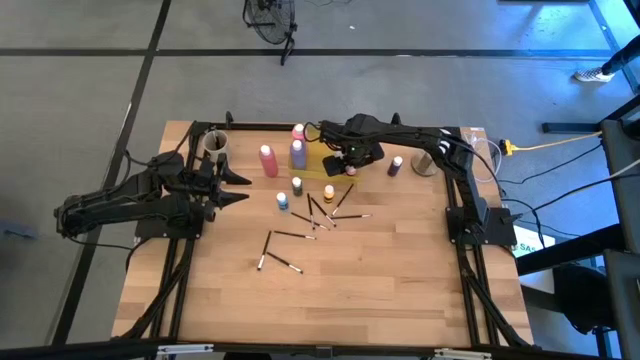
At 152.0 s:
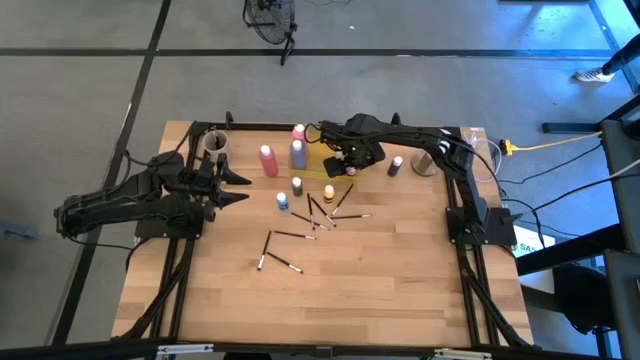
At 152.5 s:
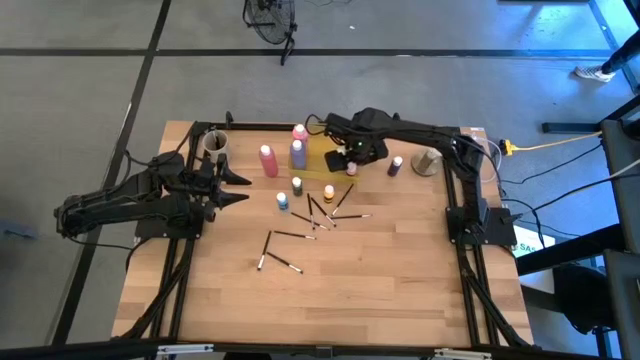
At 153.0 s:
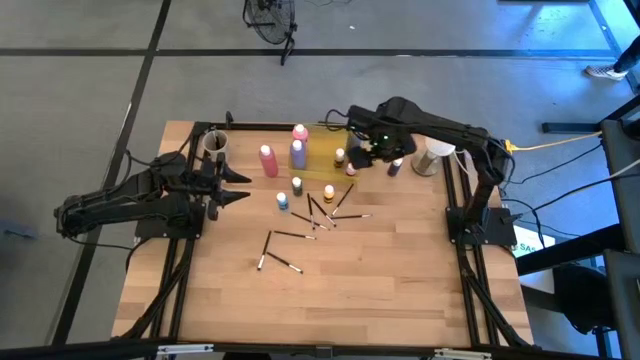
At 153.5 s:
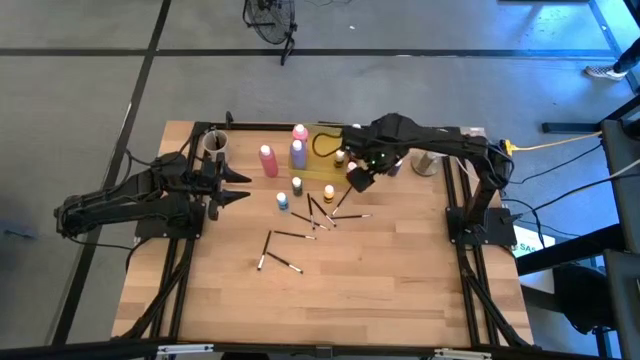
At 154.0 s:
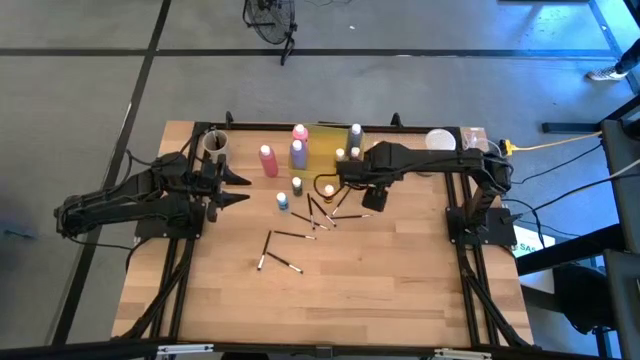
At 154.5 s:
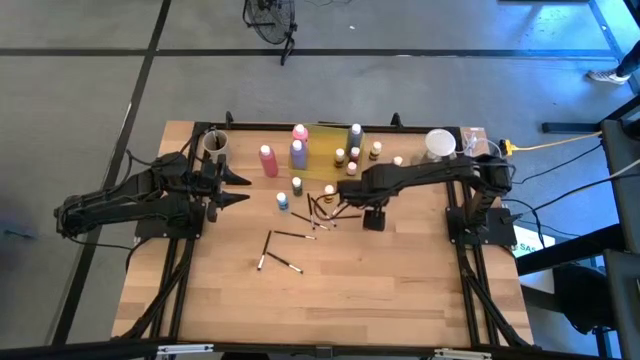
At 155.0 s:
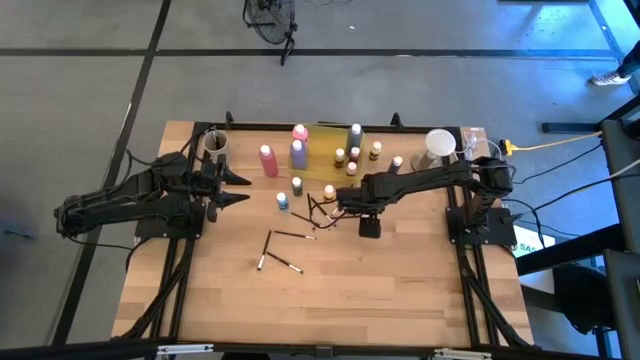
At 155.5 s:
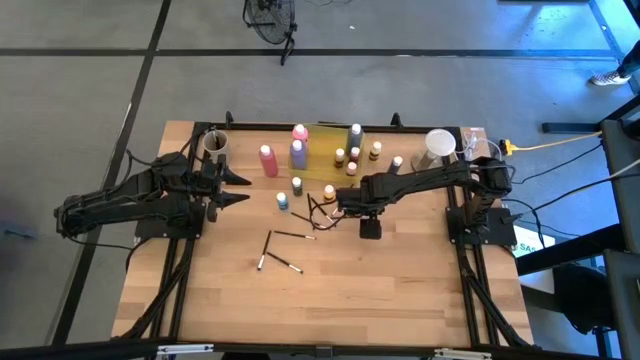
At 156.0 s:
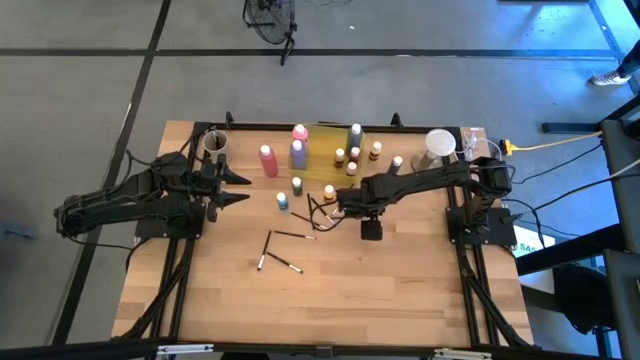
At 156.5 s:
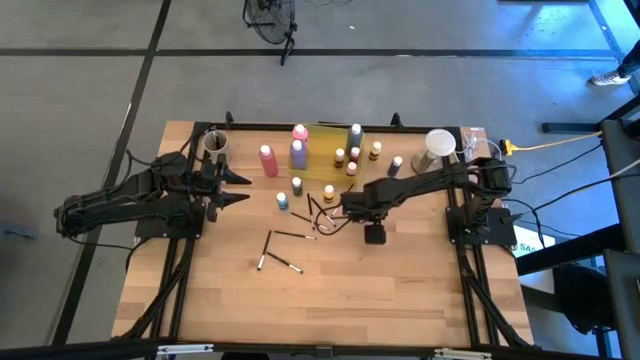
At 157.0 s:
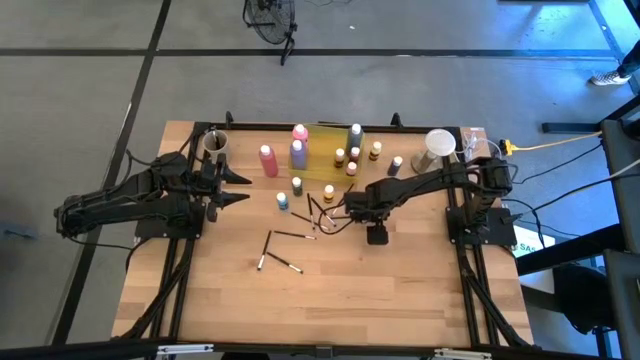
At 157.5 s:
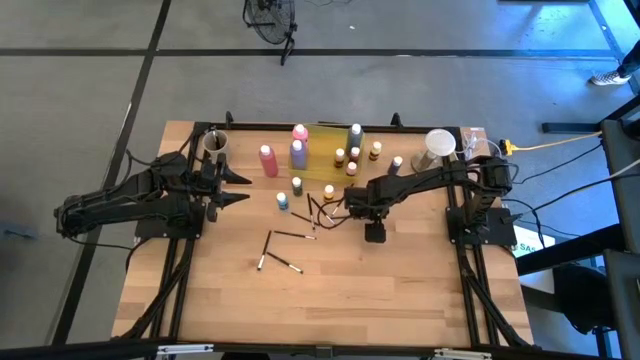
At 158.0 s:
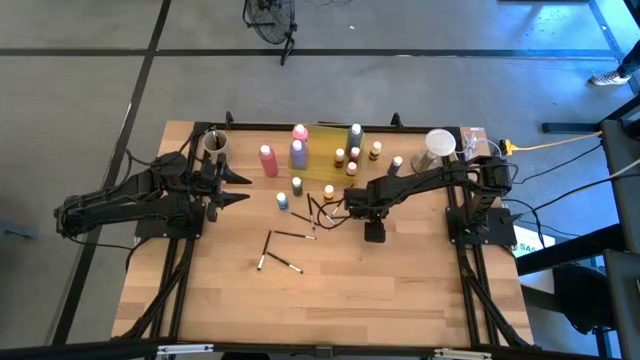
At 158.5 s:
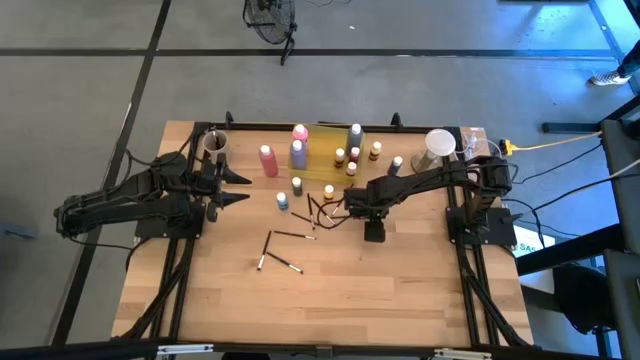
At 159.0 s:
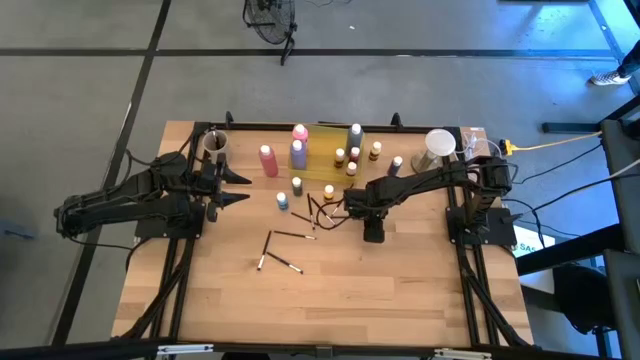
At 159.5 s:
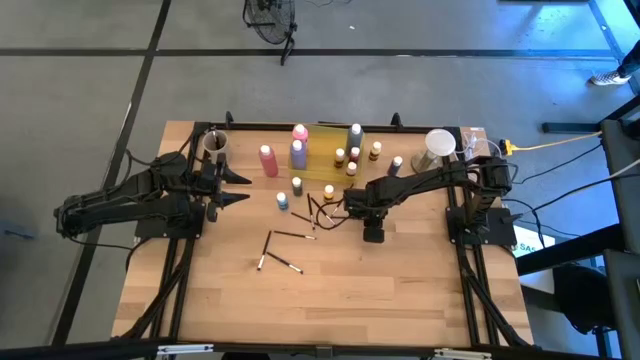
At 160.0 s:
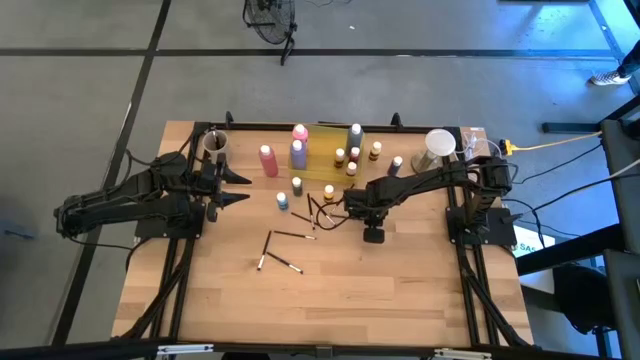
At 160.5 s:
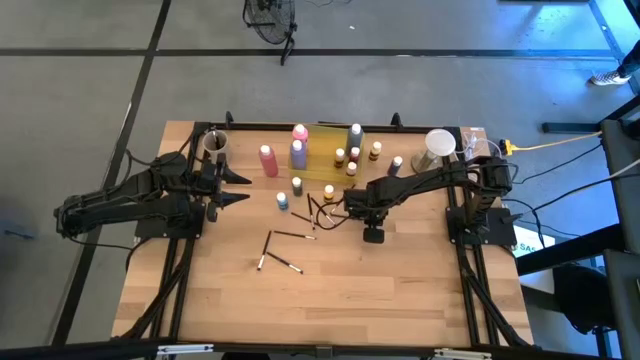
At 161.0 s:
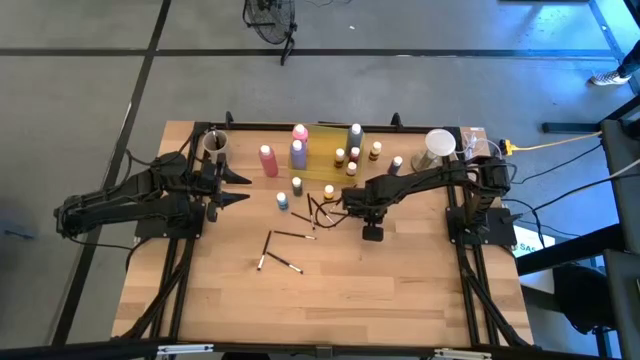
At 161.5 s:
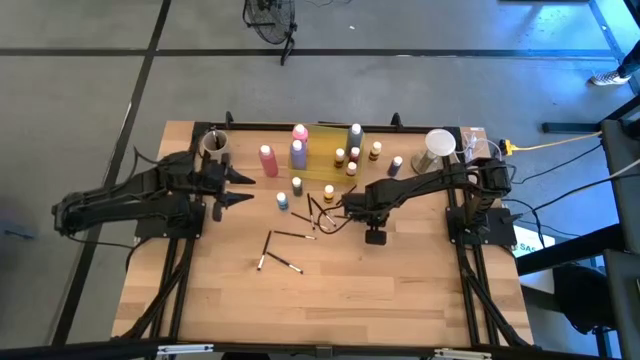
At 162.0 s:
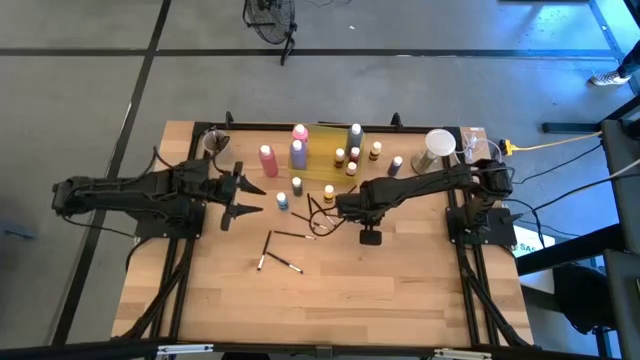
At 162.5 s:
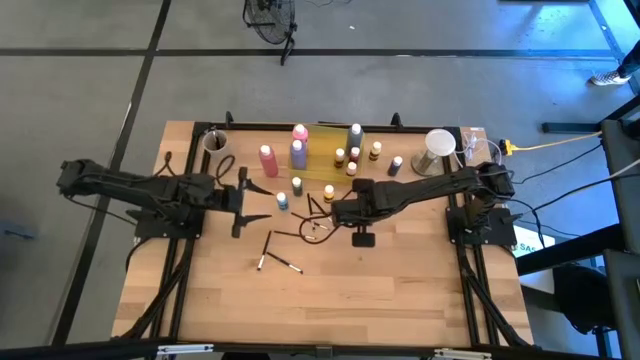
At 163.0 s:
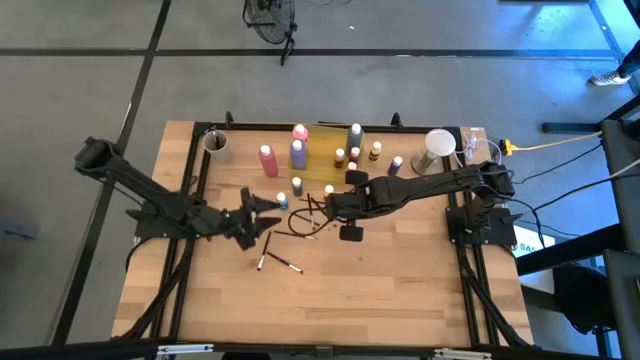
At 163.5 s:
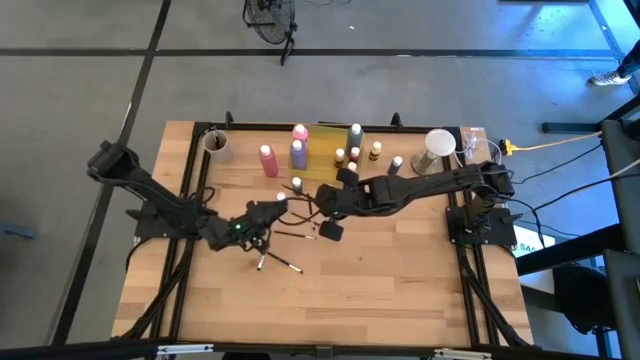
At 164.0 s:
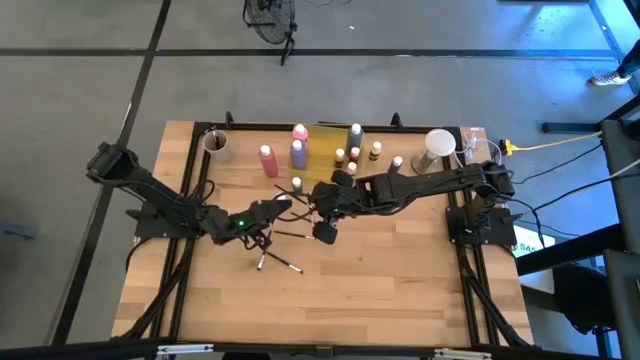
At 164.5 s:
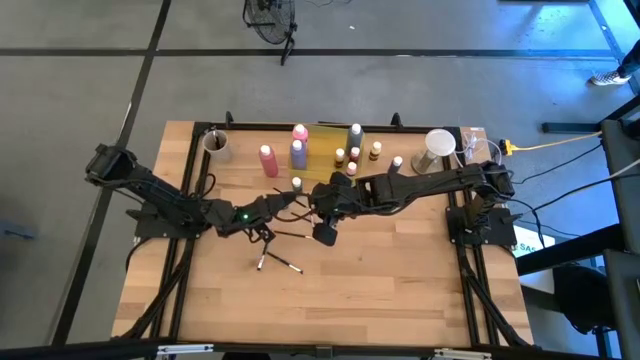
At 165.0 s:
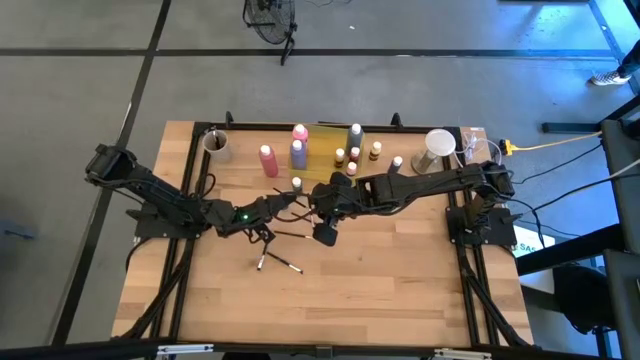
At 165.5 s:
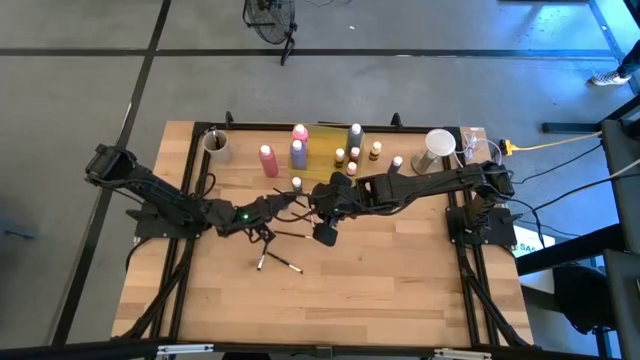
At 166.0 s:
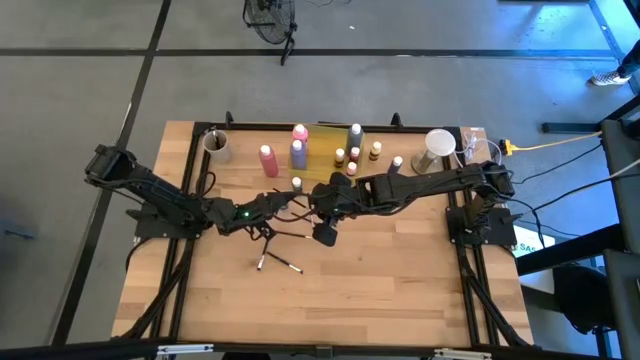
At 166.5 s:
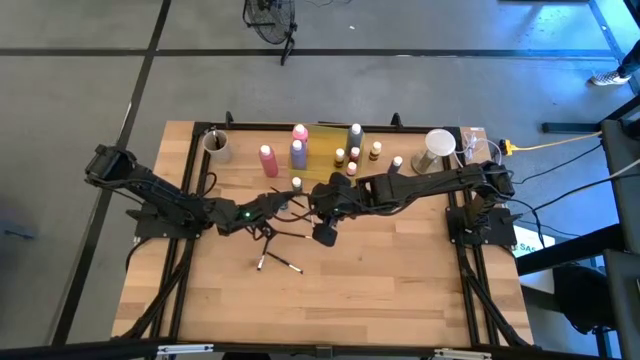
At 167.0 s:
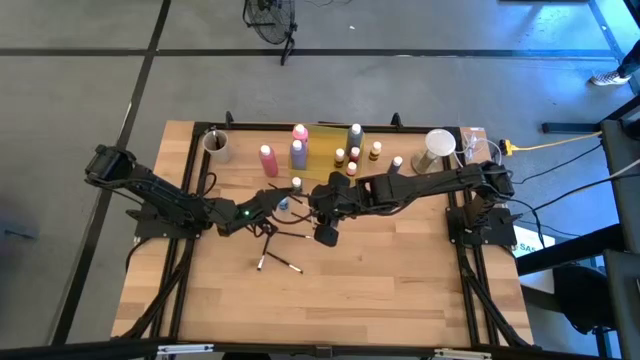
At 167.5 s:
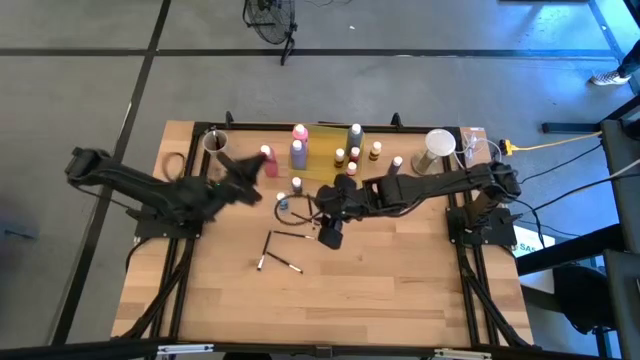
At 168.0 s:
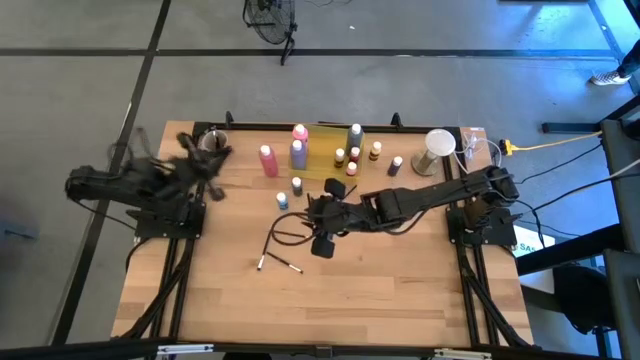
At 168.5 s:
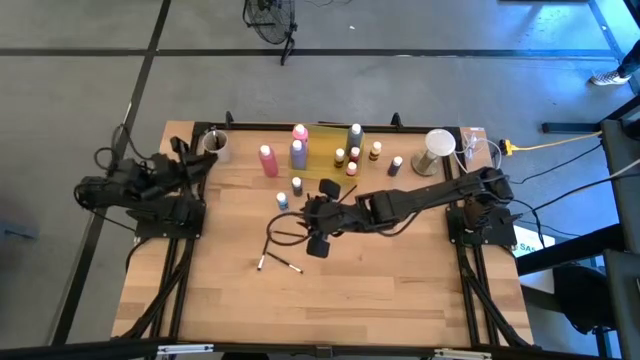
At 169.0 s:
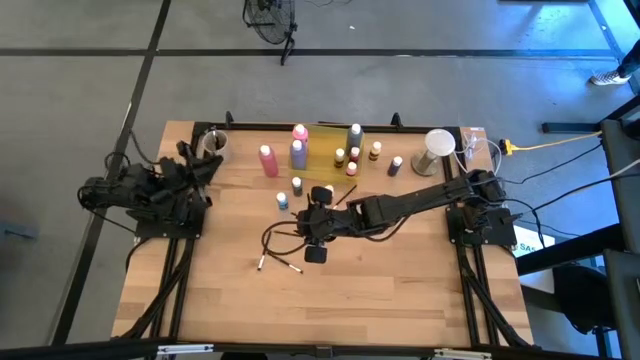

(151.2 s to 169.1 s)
Task: Pick & Place Paint Supplies
Put the silver paintbrush into the white cup

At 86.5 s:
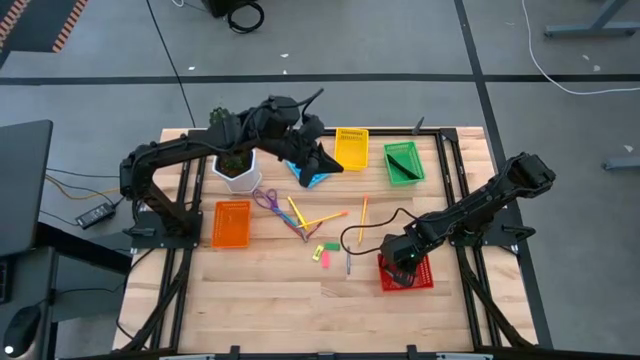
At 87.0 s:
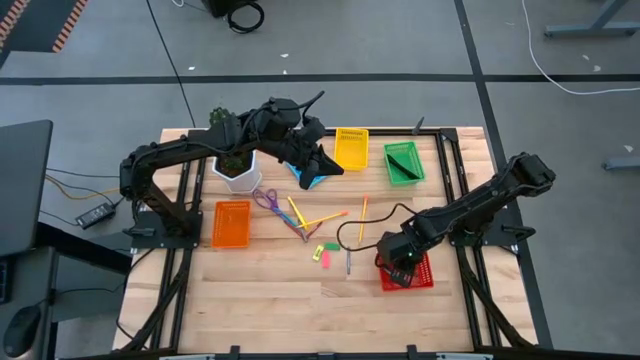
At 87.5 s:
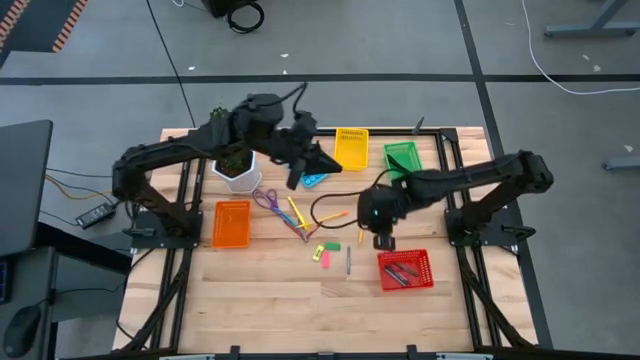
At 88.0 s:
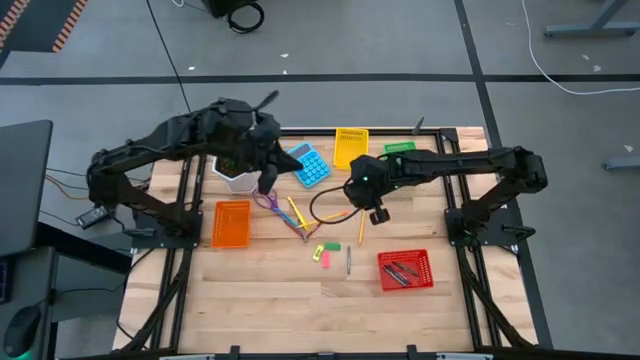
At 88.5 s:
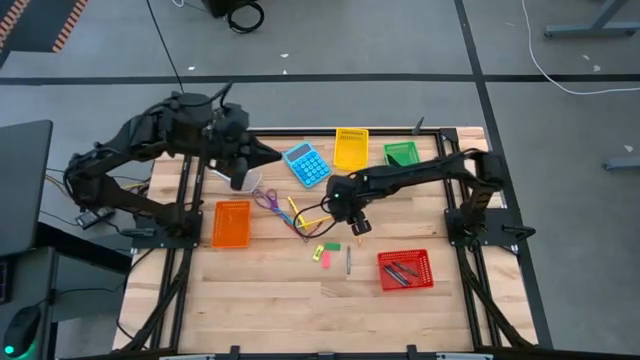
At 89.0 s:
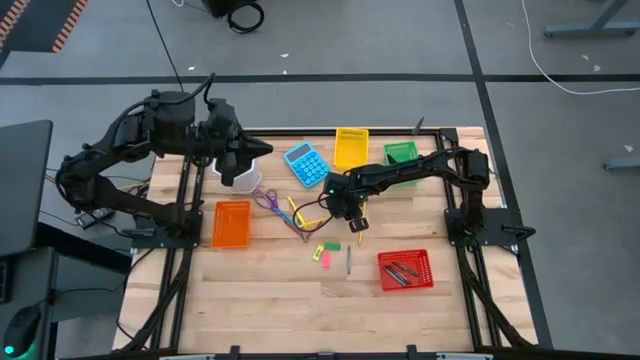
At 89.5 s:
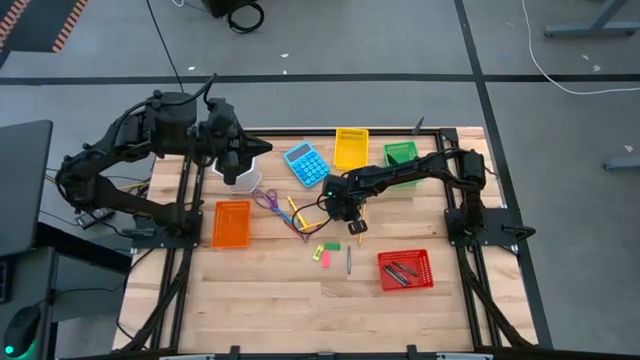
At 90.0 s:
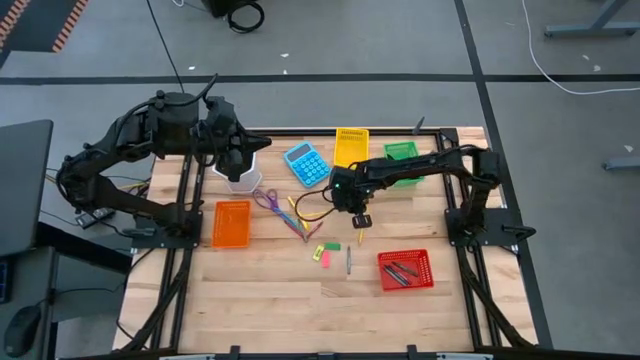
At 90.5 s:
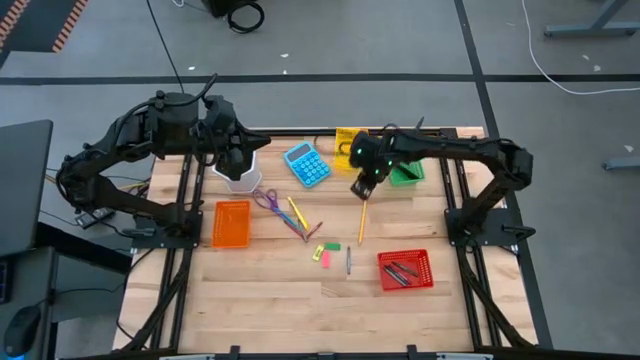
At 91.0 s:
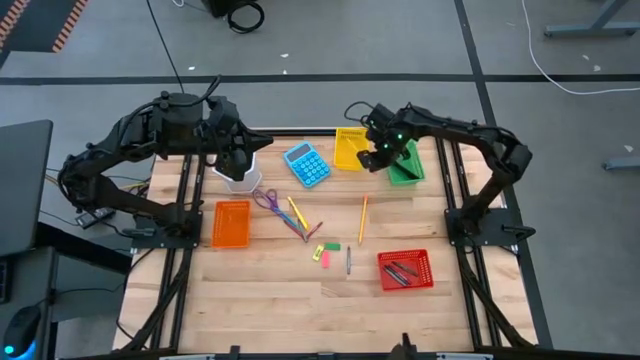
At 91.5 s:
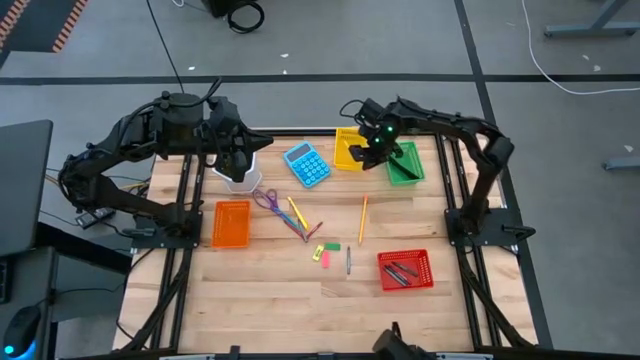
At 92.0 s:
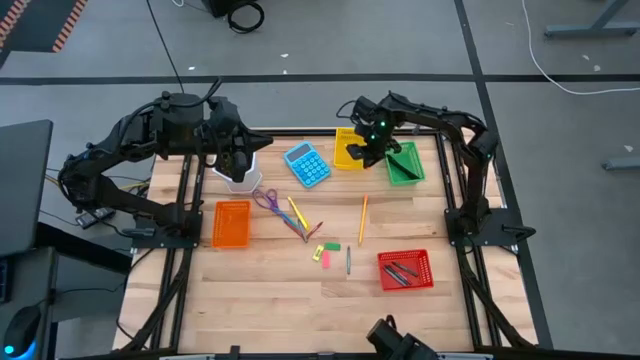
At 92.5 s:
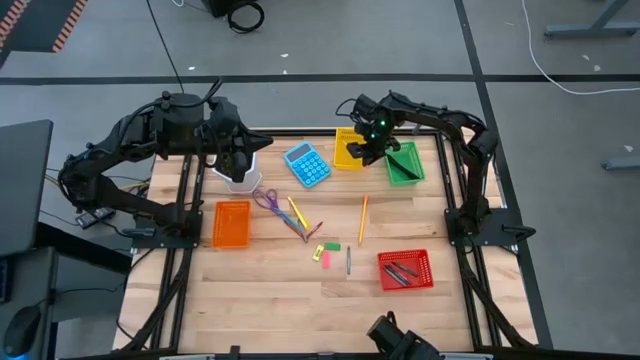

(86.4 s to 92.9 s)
Task: Sort crayons/erasers/pens/pencils in bins
Put the left yellow pencil into the yellow bin
